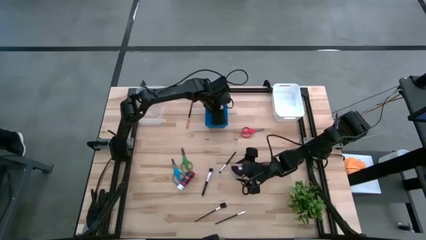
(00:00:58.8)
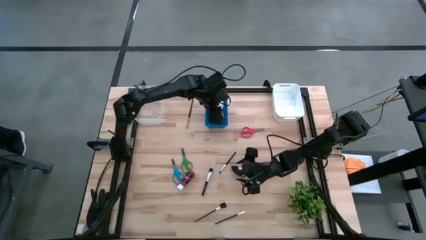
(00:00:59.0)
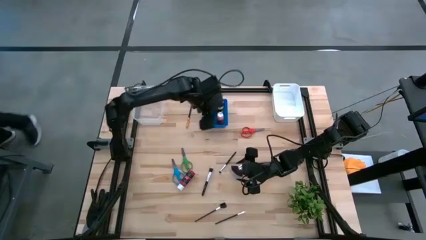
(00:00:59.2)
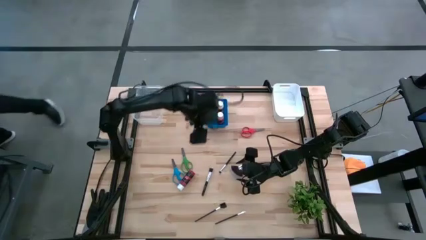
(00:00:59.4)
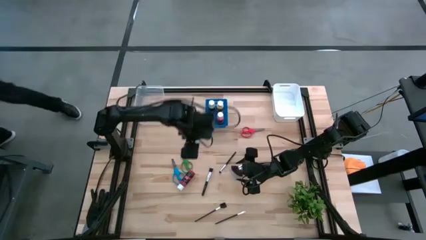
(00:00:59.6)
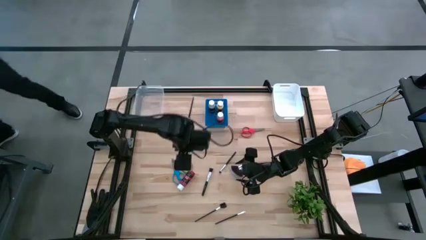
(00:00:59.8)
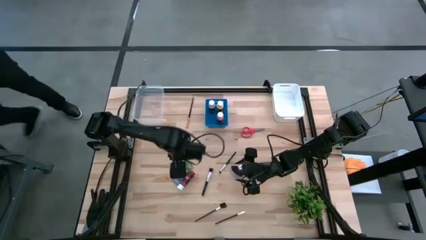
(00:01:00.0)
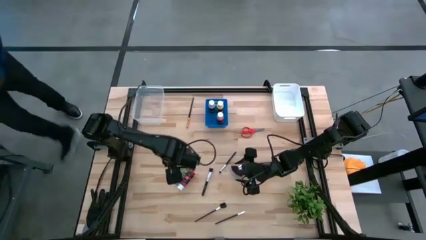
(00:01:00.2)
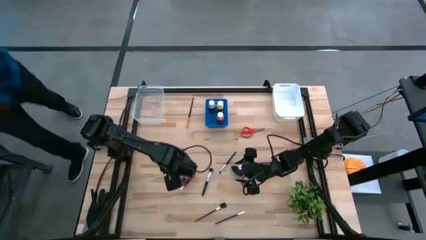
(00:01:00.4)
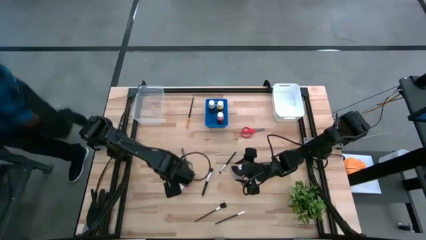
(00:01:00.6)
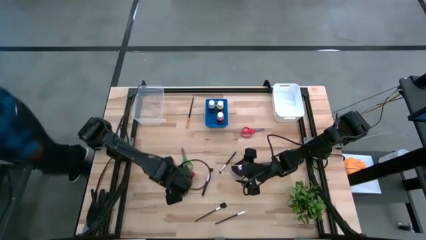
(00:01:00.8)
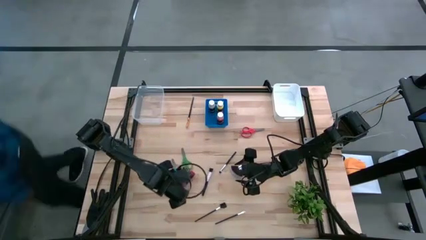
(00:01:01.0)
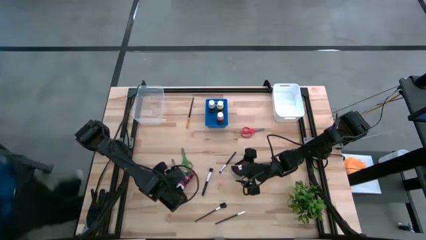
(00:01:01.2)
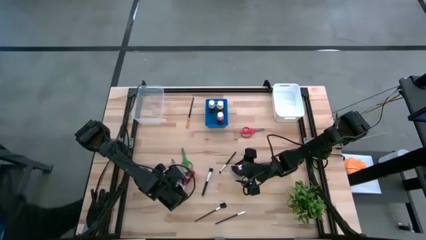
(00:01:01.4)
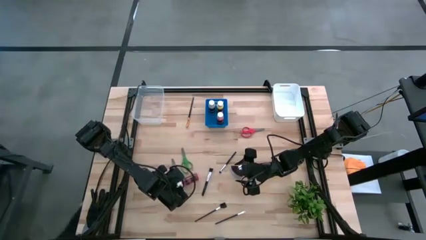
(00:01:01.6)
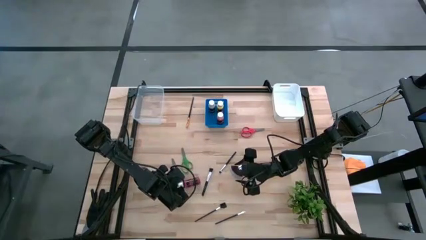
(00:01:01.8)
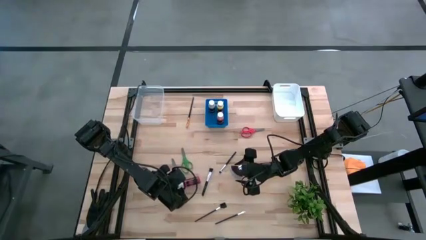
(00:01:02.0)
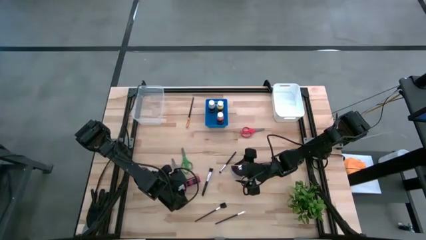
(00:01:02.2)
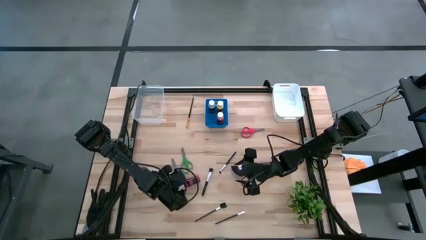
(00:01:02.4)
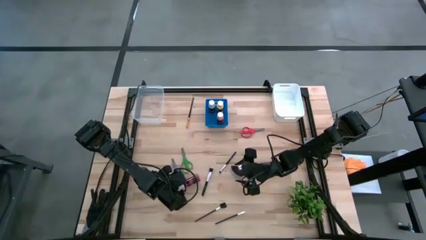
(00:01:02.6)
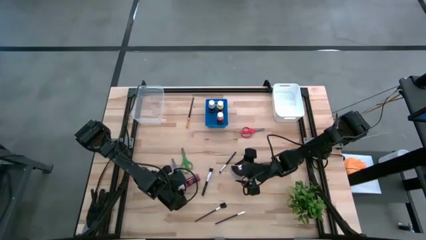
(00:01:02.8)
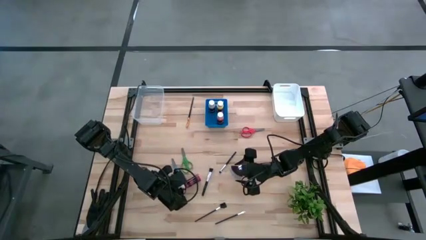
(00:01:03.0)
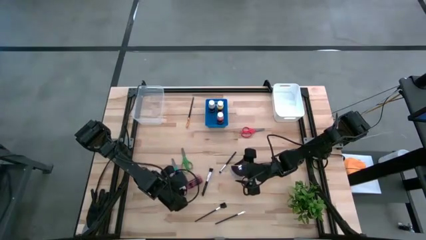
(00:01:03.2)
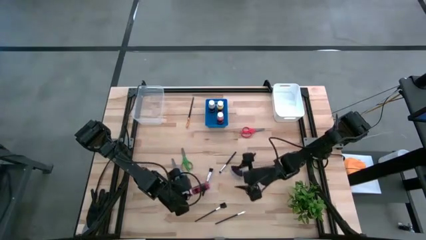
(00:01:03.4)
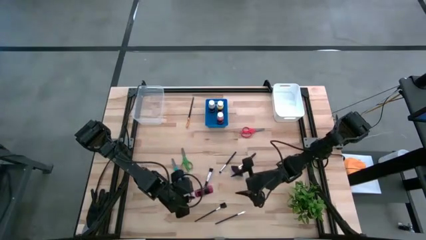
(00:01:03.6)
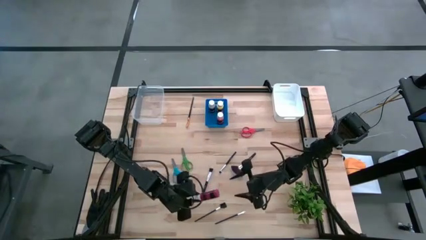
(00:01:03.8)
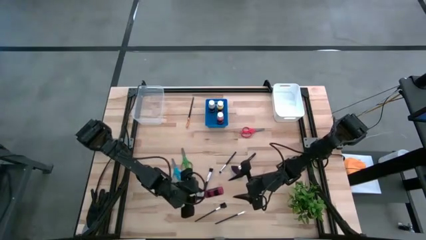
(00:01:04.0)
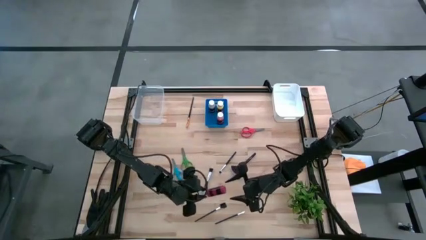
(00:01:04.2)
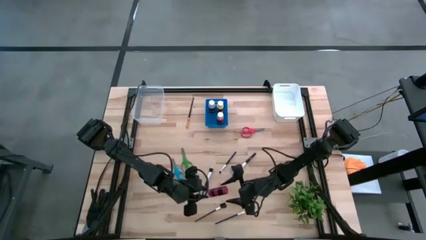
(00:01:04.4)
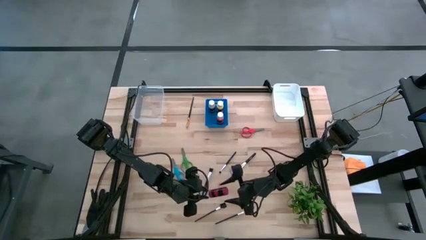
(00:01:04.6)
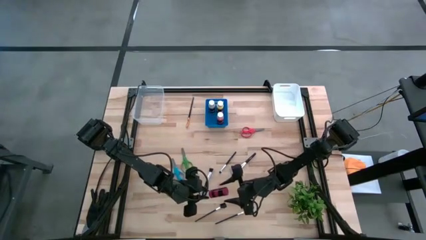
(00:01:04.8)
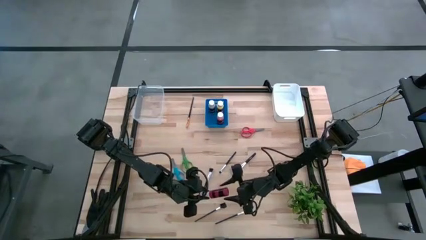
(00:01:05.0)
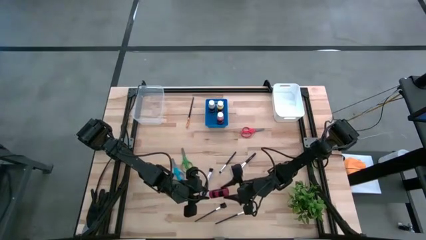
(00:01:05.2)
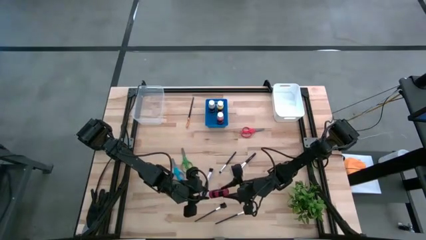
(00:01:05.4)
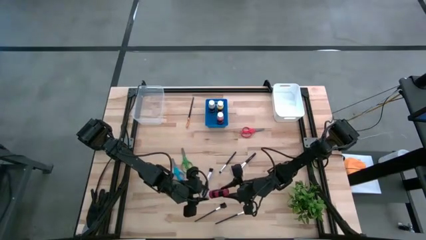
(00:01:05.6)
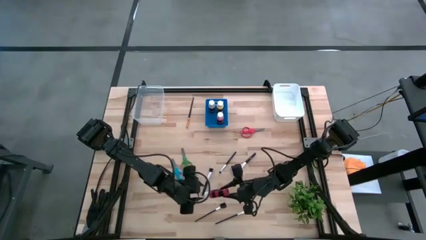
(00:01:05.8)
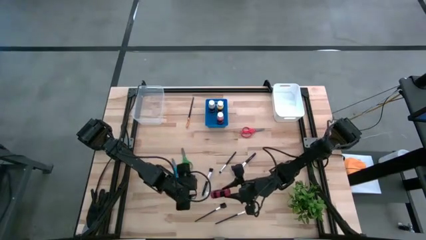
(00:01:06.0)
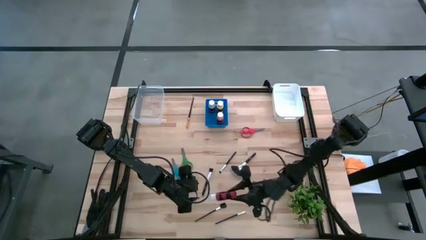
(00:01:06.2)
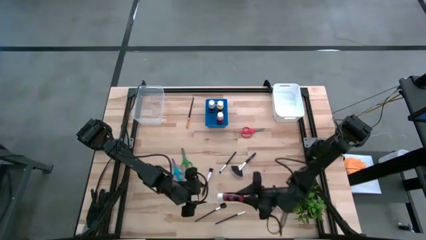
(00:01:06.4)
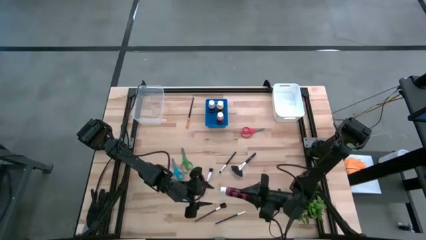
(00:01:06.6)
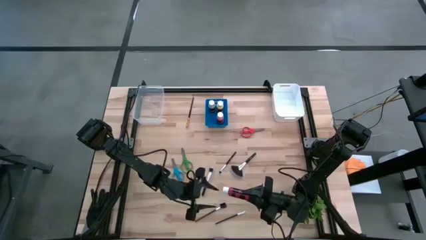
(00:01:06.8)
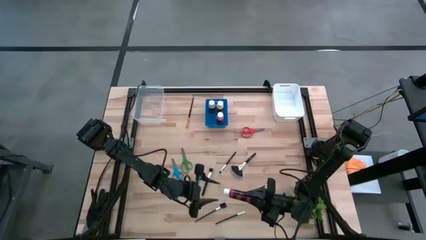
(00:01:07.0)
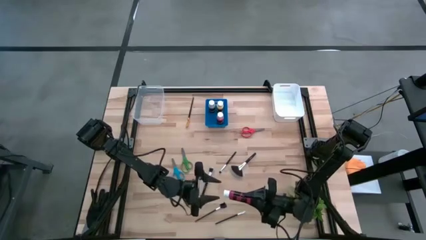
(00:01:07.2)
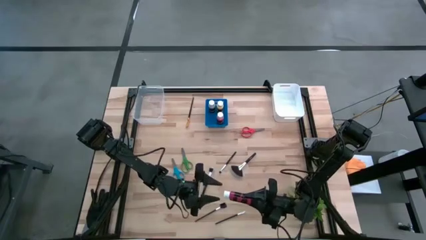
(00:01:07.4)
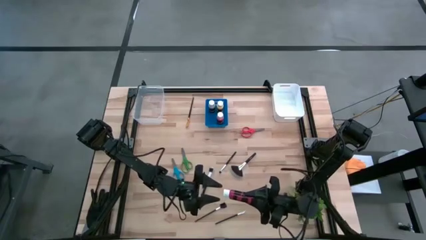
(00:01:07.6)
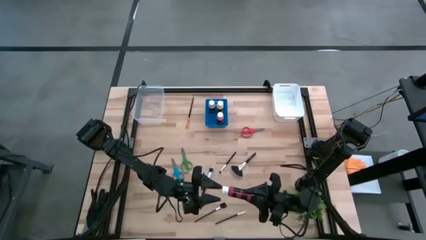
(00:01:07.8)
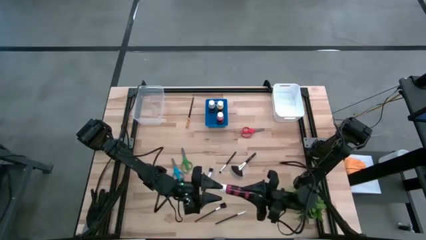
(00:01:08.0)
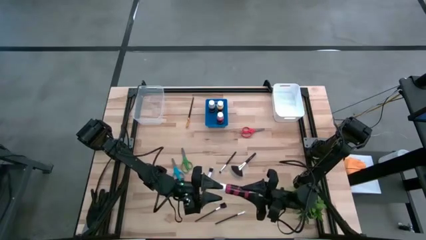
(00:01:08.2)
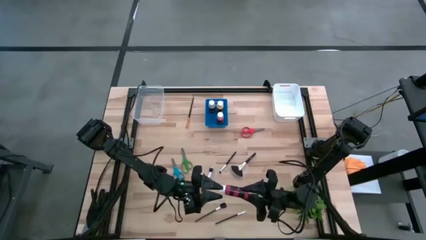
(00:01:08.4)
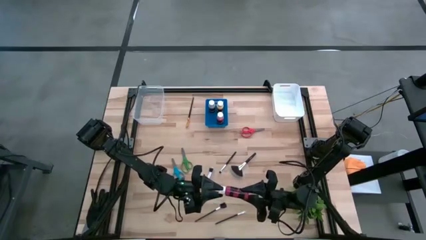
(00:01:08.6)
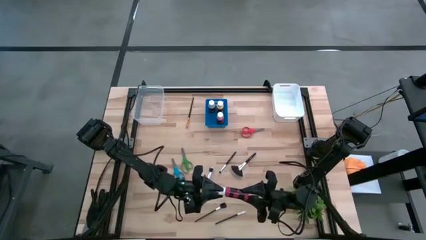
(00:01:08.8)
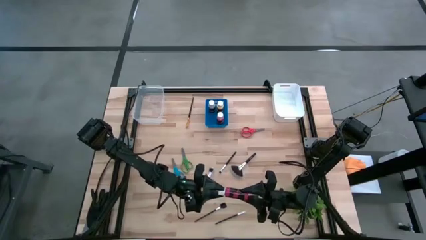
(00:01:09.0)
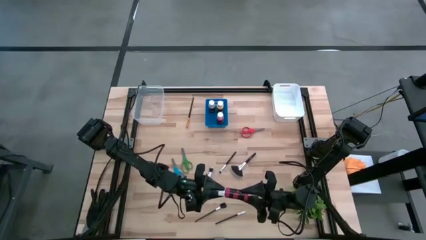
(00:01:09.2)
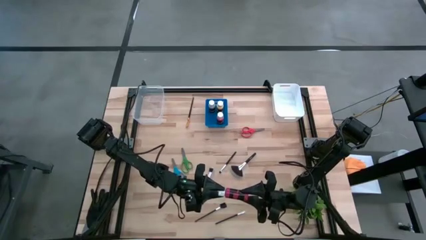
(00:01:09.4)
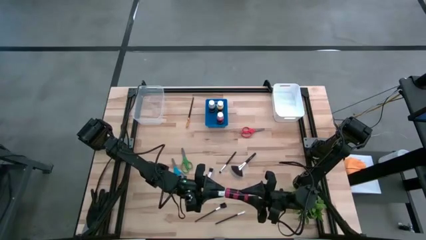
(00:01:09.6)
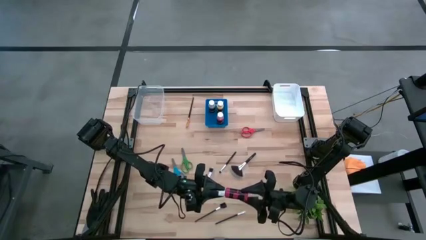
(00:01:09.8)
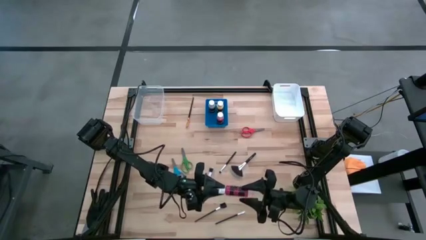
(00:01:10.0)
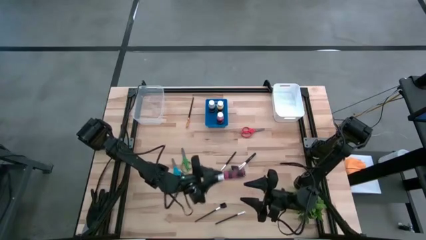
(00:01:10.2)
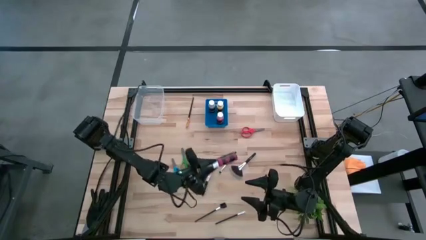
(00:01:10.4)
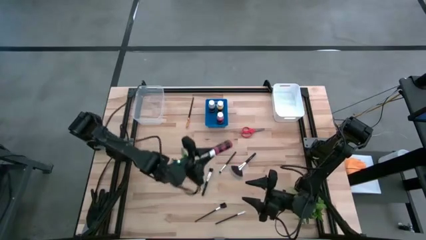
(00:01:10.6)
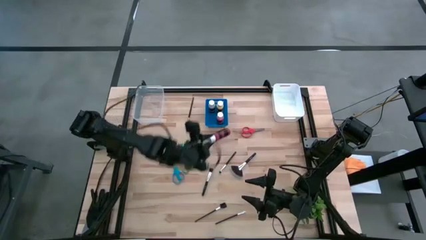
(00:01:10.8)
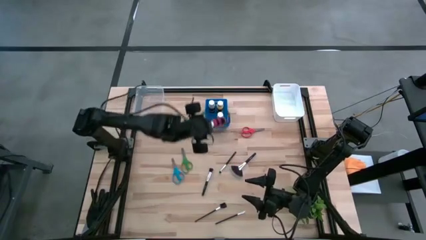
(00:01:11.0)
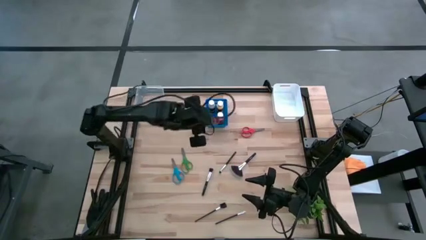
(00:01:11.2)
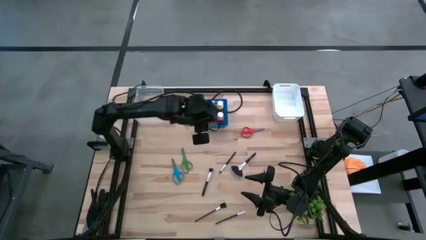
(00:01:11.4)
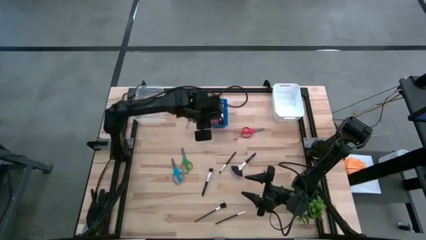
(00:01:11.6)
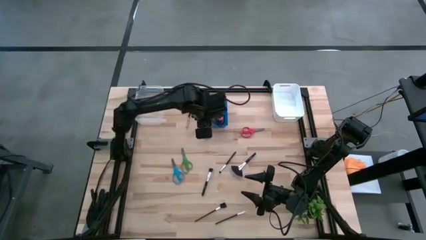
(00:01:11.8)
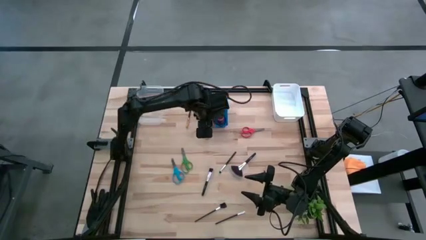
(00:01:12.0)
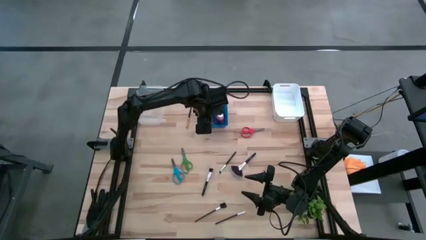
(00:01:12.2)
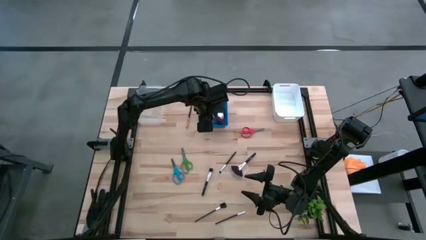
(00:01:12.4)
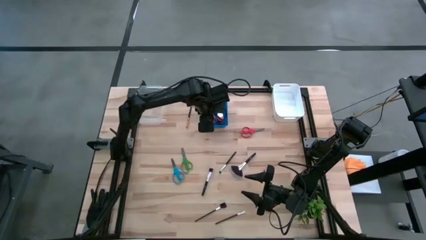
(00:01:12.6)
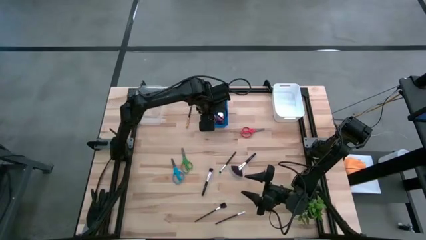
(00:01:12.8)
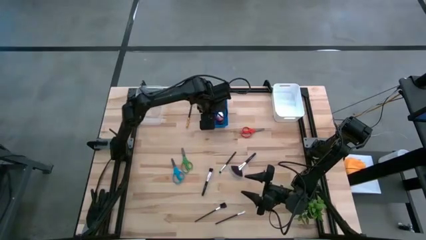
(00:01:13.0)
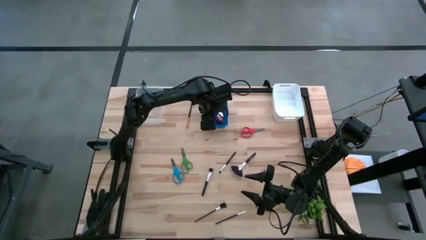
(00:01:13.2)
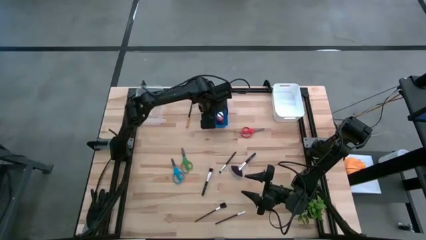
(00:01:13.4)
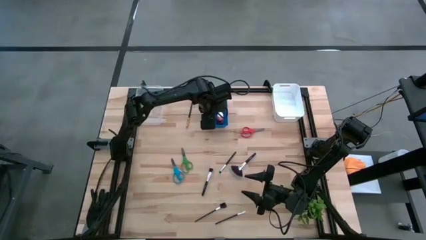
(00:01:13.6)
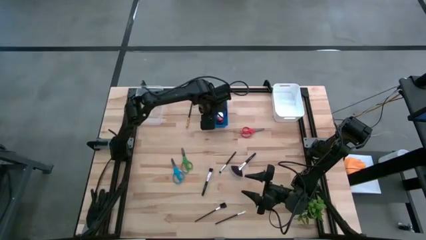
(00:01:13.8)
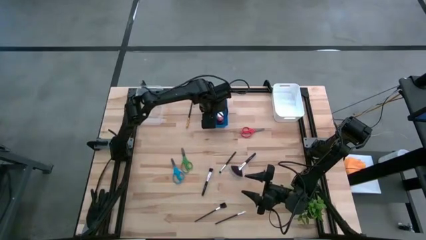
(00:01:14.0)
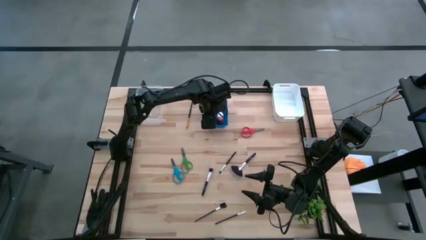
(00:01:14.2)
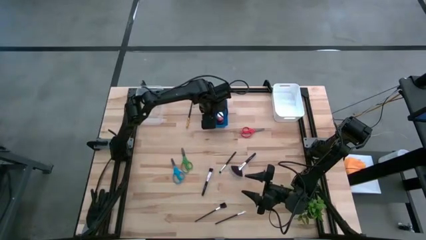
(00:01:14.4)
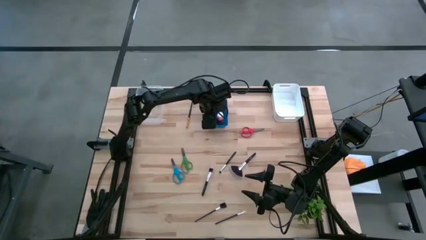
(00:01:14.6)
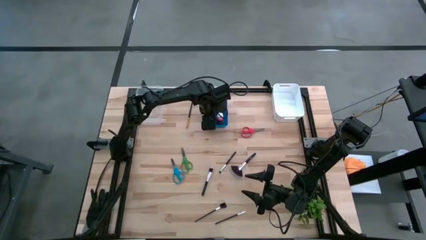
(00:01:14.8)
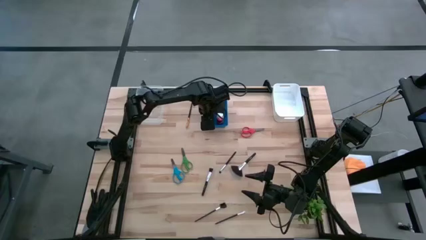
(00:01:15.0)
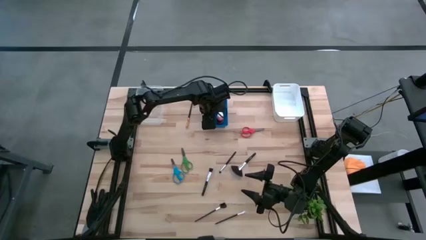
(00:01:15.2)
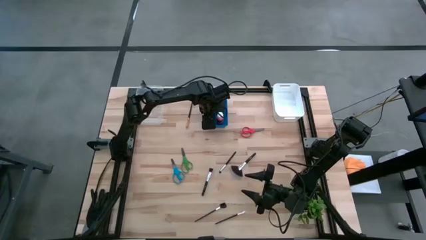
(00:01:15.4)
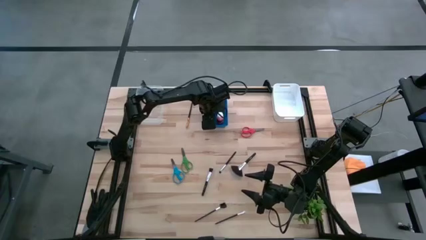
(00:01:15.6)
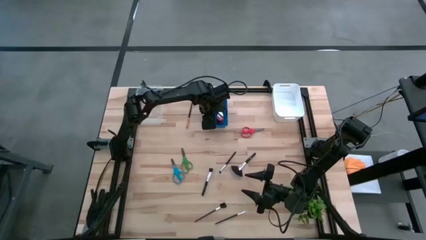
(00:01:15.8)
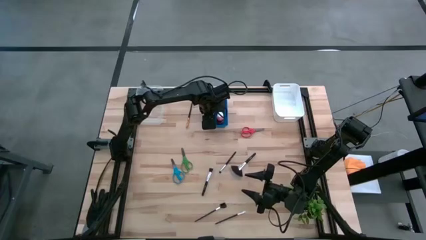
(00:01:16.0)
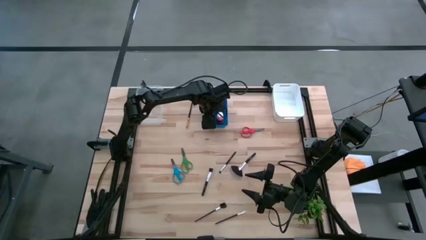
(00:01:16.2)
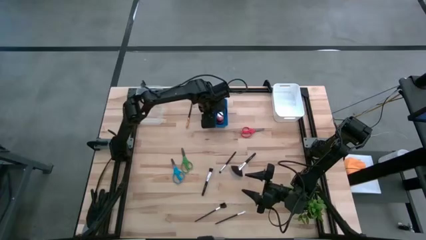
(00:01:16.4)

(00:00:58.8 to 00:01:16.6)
Task: Pick & Place Paint Supplies
Put the red paint bottle into the blue bin
